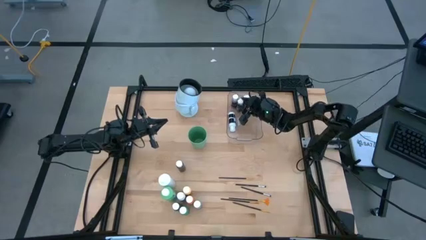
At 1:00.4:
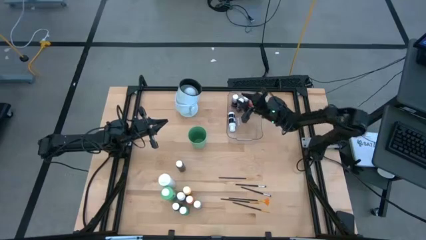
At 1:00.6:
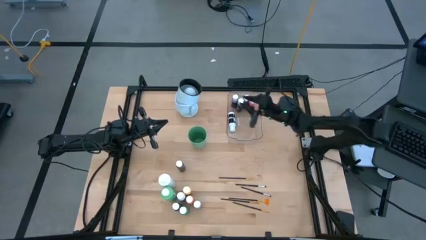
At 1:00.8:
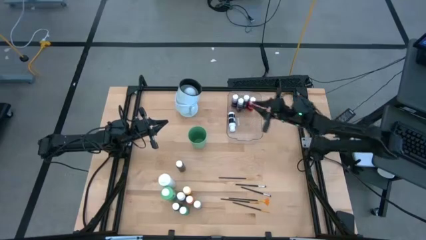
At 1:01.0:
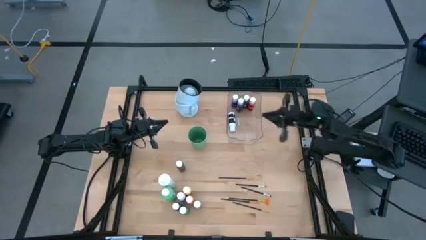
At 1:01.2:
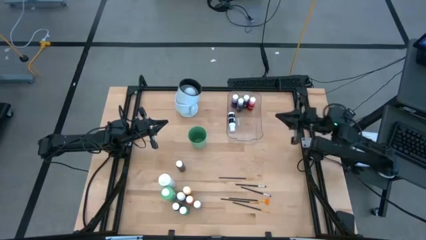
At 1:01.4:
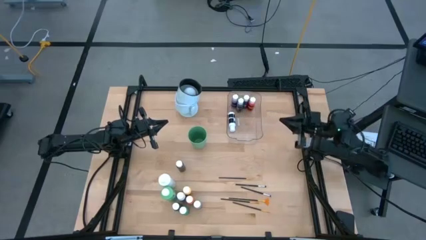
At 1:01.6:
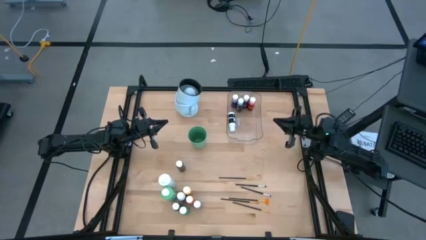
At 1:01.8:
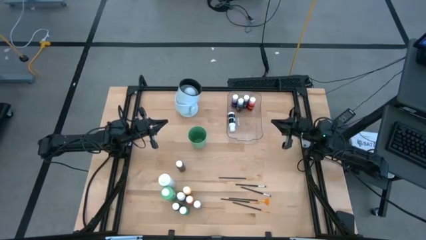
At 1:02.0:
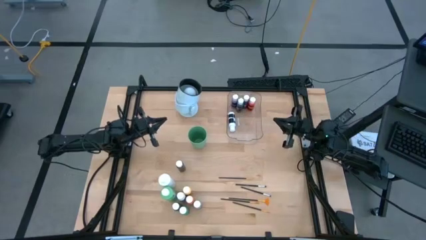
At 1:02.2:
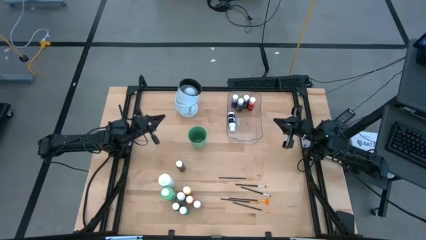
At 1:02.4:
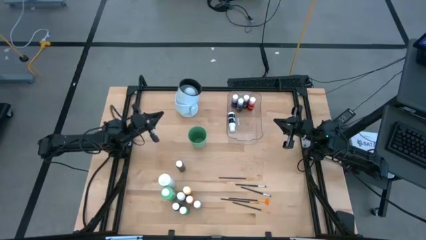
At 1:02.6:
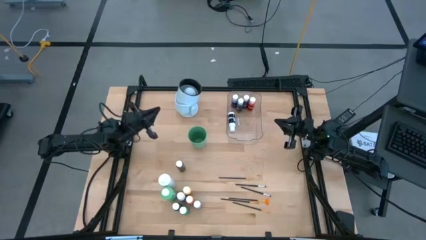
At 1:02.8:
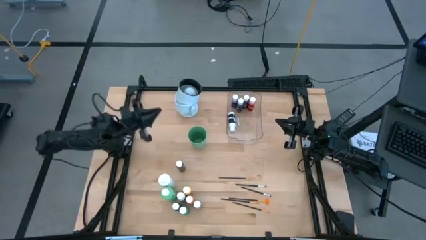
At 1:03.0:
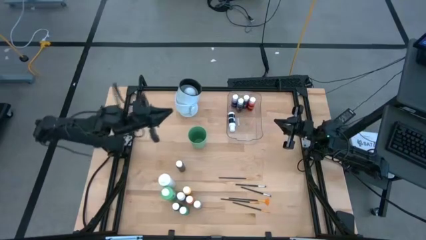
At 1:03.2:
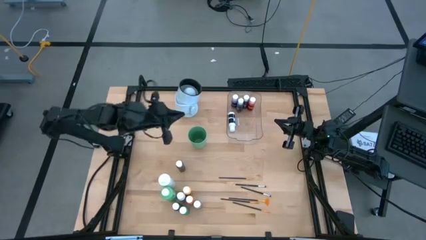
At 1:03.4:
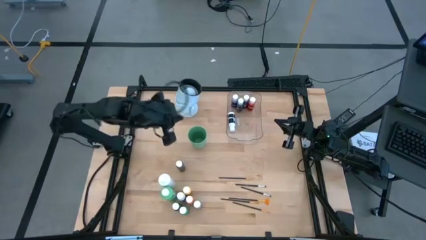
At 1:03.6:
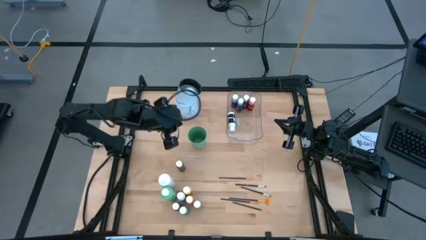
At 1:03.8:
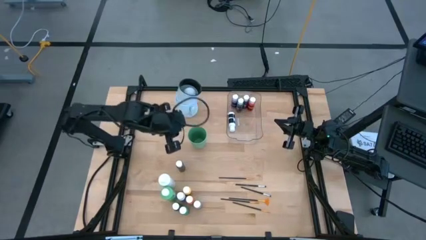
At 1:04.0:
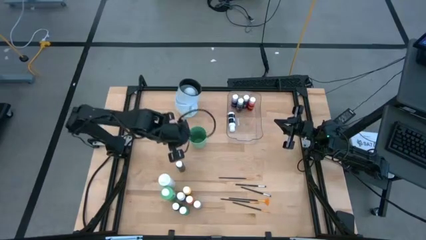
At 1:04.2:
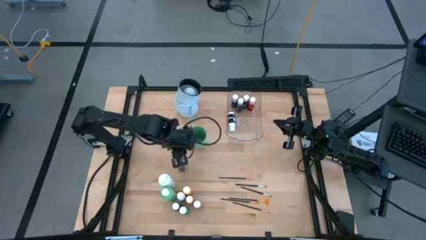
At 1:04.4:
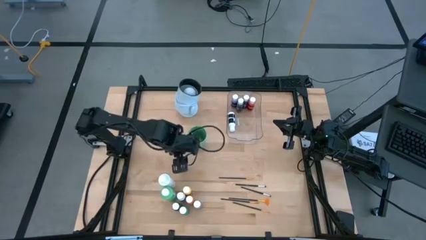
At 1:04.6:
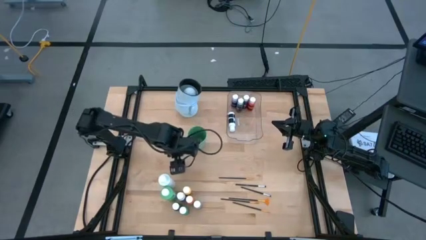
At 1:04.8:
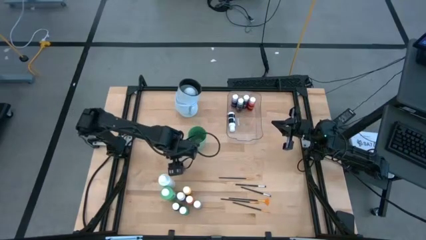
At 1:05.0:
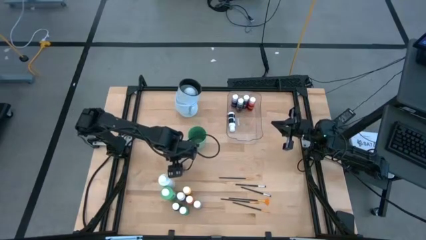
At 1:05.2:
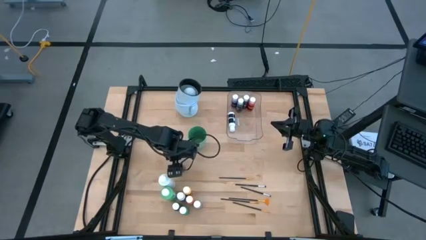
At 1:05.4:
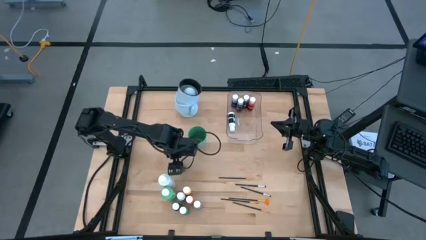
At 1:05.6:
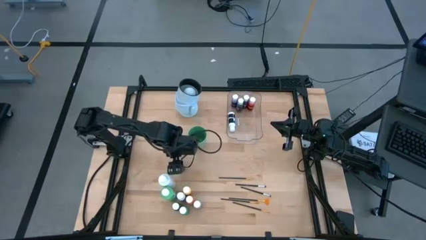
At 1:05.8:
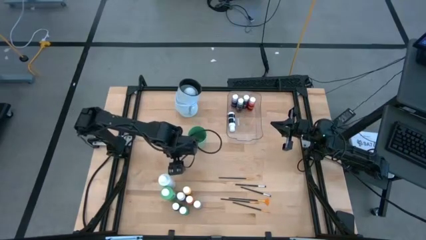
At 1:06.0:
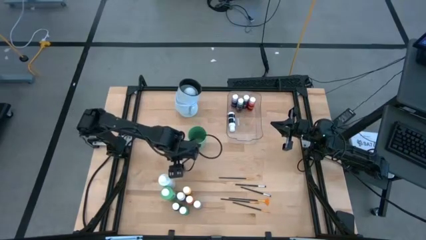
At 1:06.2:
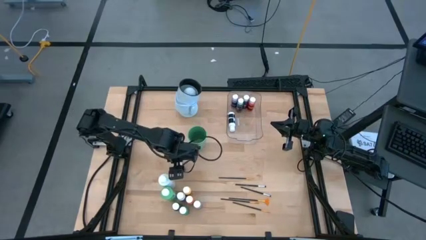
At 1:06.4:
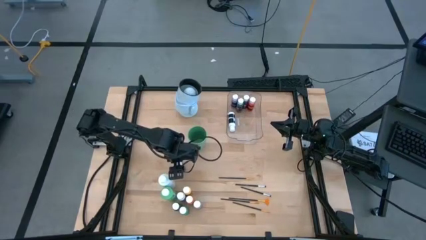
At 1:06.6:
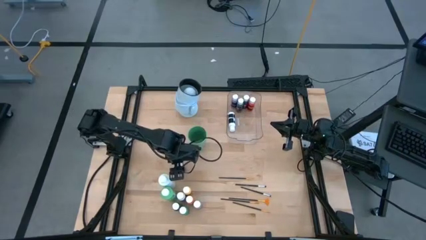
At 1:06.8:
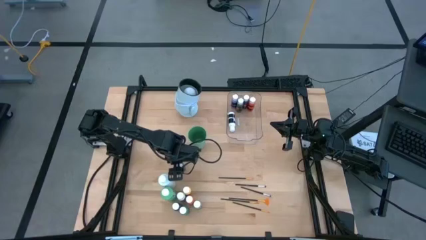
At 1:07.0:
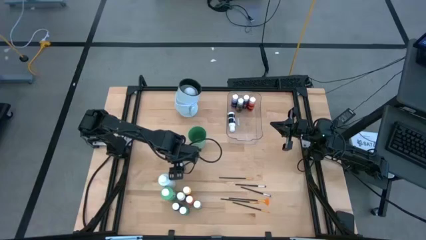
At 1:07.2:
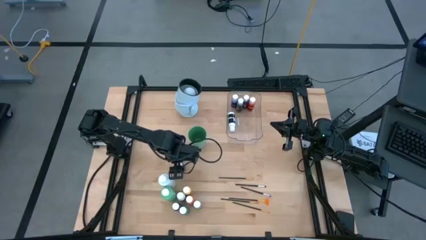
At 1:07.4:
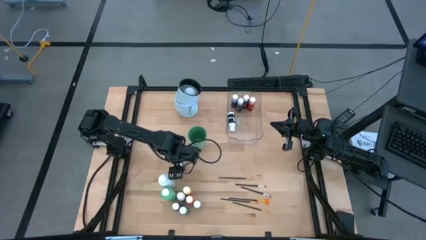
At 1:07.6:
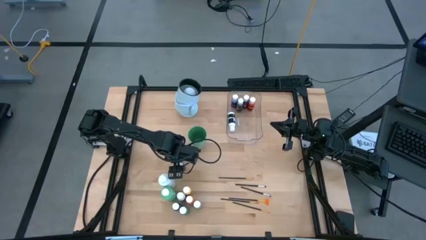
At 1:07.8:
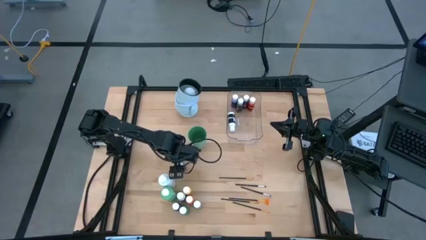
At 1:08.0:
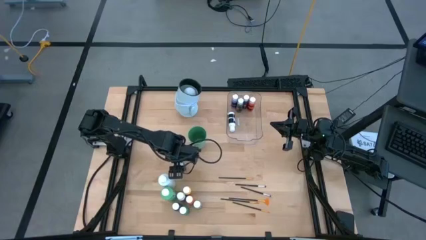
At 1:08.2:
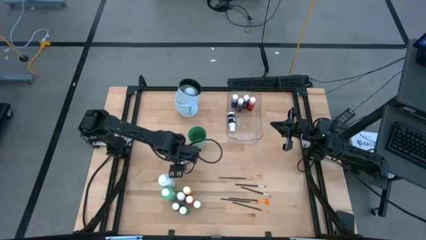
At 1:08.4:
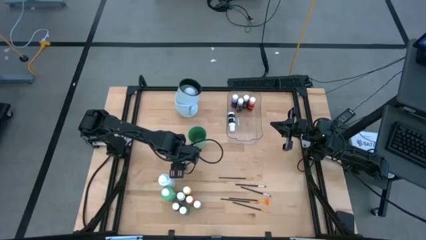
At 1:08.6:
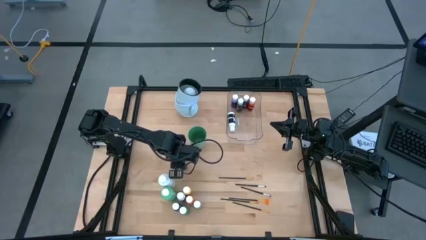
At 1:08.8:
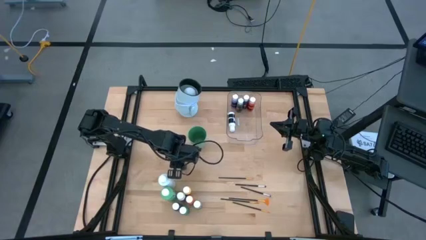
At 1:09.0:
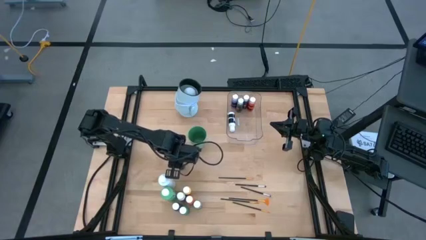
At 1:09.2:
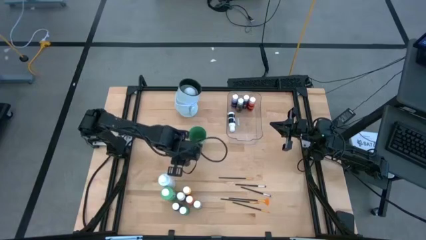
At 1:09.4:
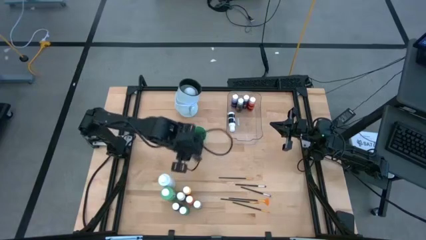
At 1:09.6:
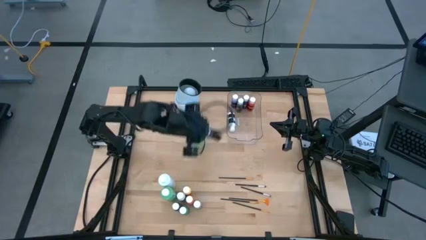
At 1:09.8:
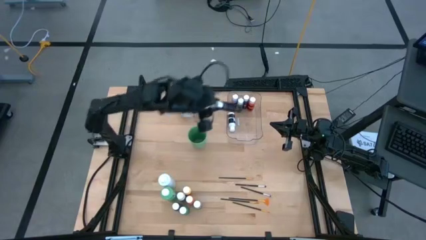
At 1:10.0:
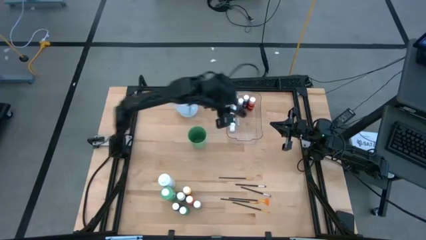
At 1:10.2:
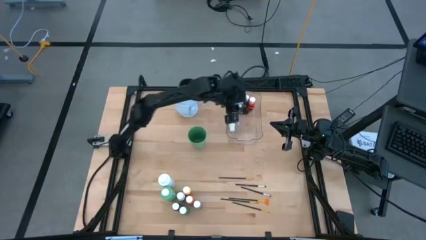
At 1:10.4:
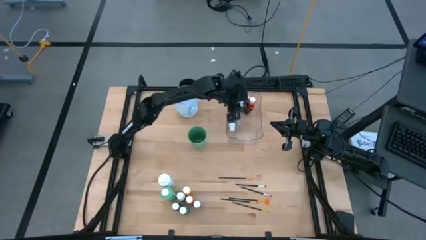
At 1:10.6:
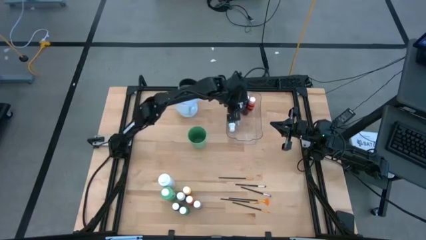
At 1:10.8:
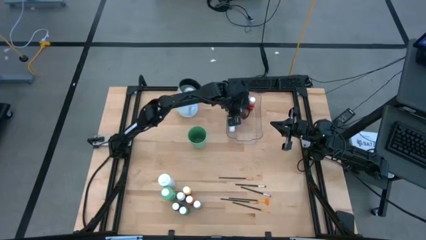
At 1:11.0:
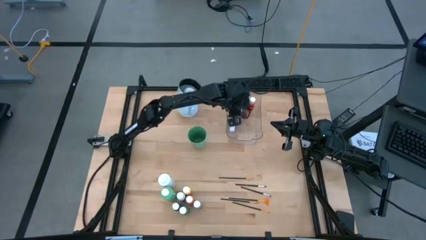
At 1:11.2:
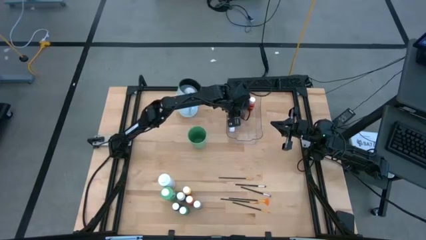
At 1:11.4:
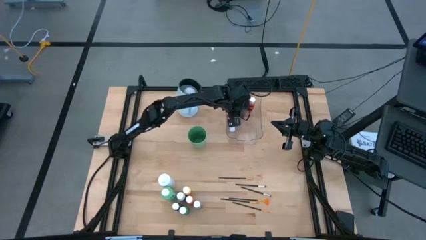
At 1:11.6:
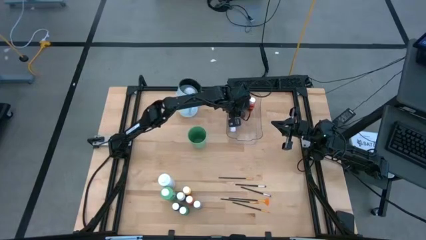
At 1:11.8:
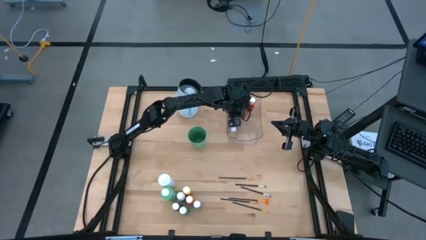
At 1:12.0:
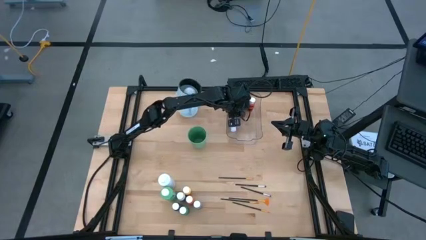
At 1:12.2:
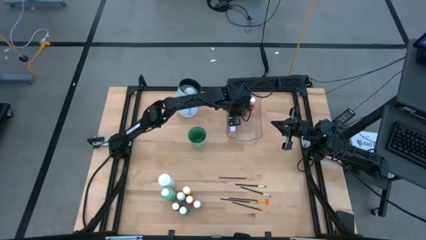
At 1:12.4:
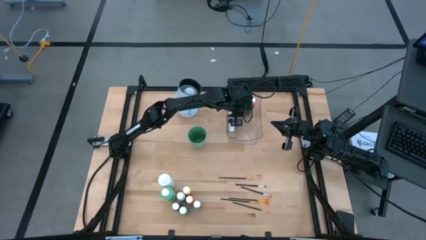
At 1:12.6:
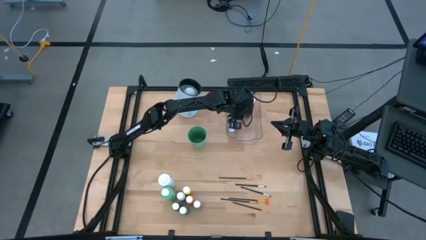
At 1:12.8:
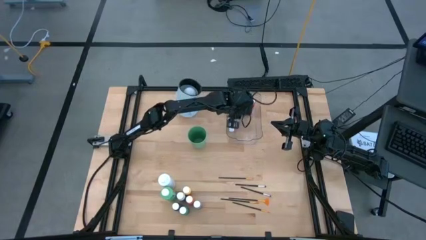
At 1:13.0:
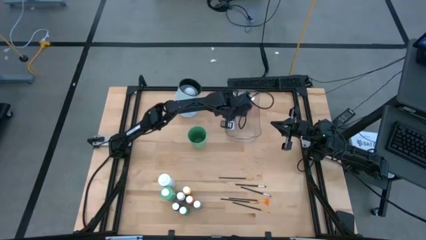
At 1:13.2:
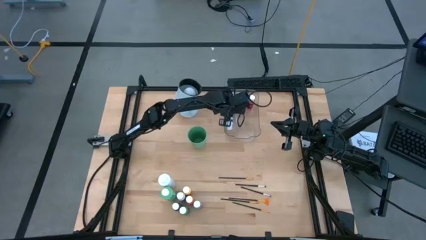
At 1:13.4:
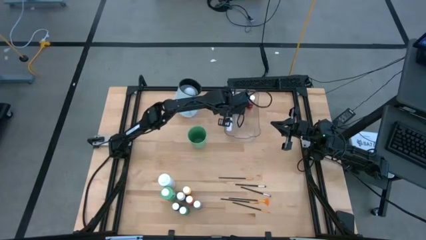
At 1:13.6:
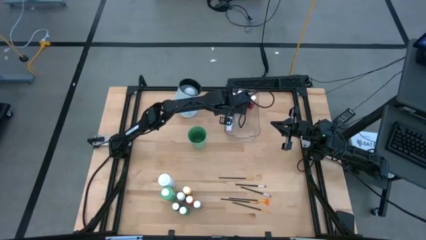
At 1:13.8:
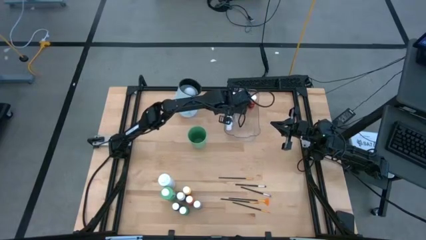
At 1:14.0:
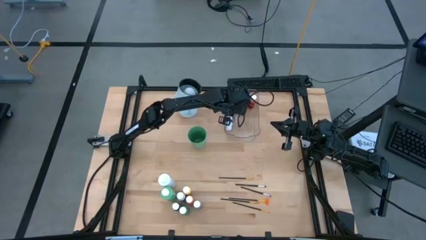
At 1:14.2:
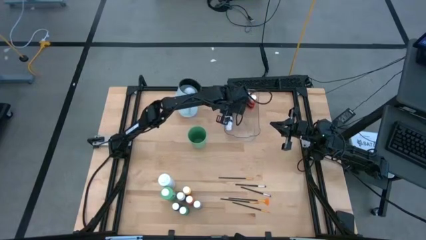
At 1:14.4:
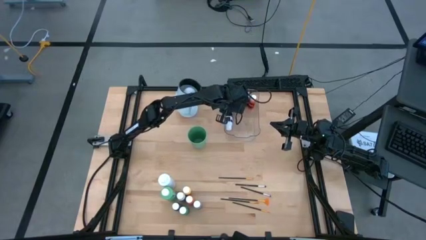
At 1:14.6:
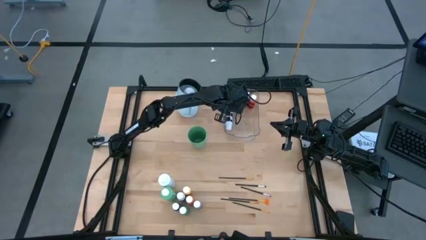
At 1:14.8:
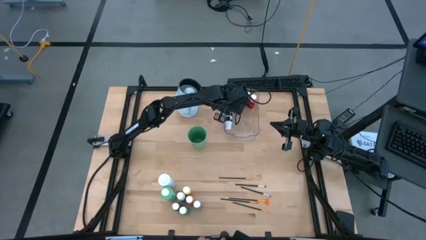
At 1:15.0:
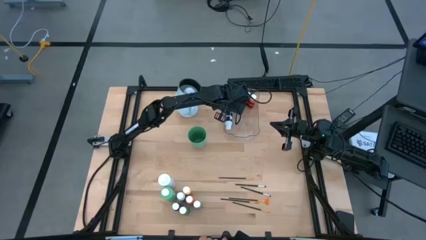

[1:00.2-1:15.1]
Task: Pick & Place Paint Supplies
Put the brown paint bottle into the transparent bin
